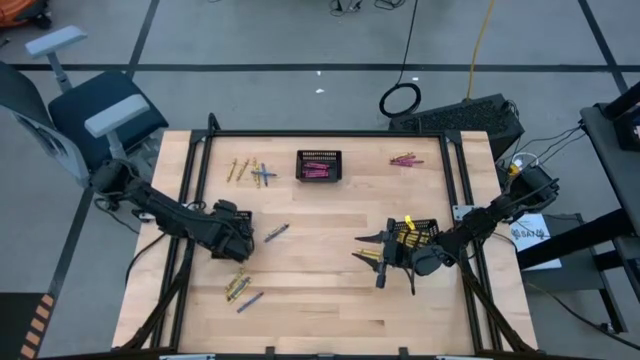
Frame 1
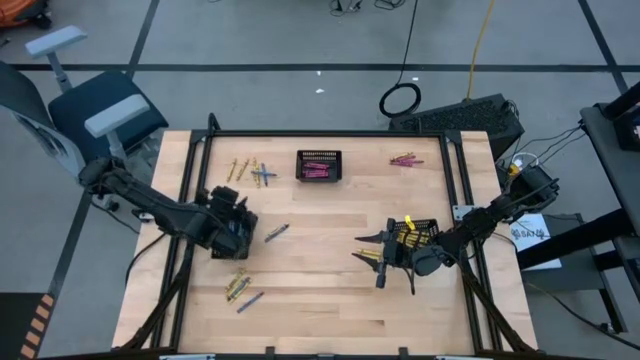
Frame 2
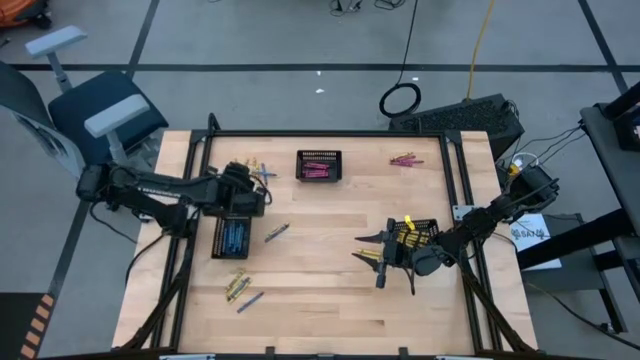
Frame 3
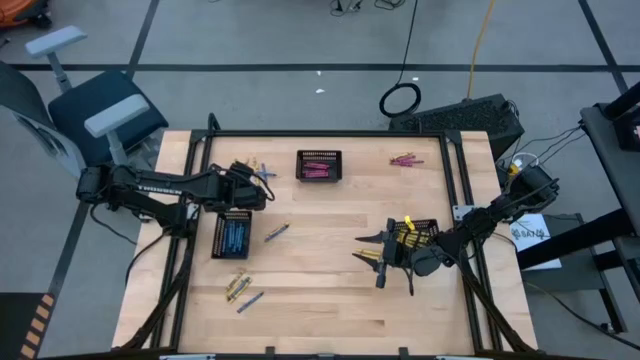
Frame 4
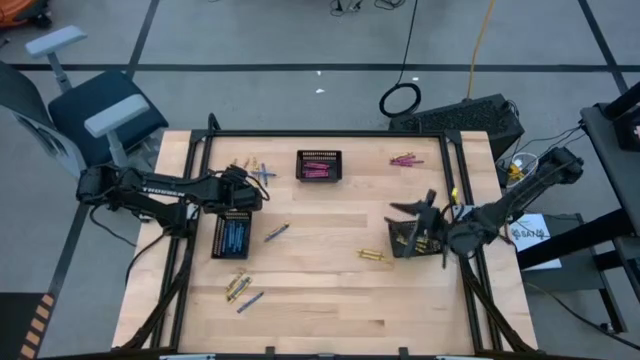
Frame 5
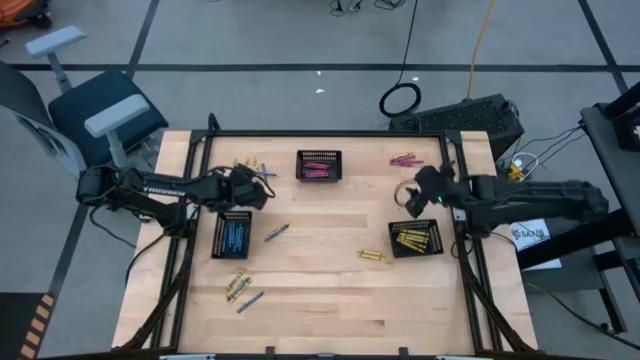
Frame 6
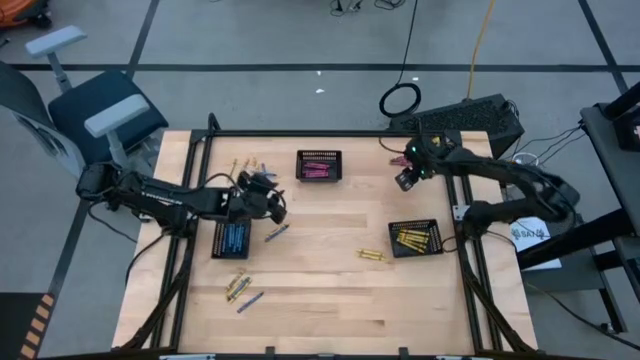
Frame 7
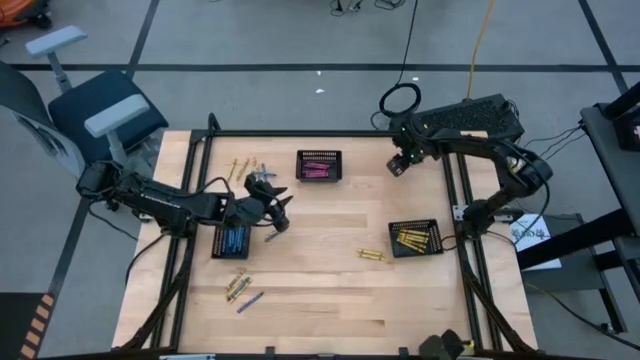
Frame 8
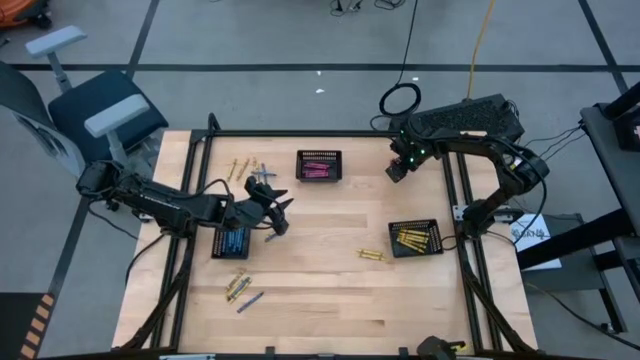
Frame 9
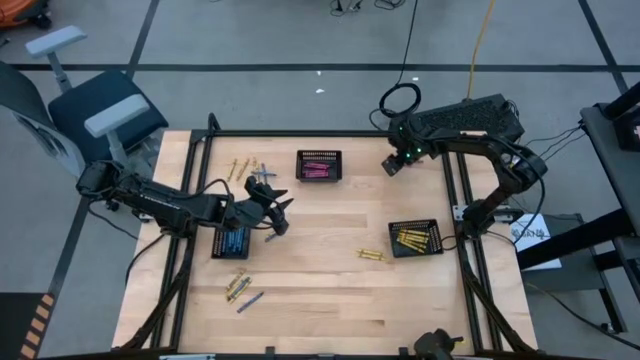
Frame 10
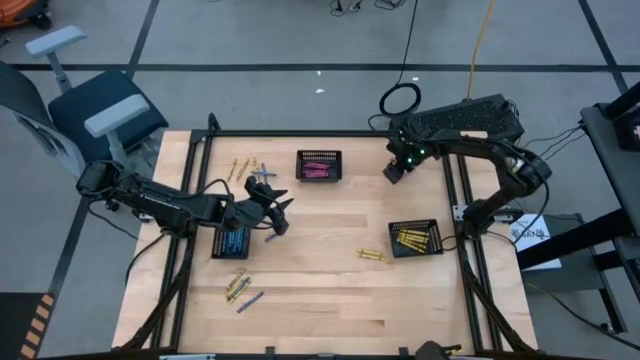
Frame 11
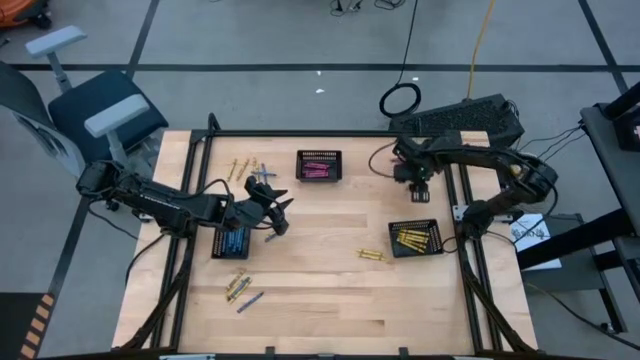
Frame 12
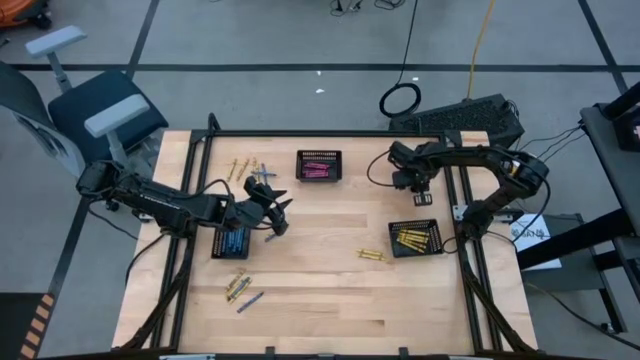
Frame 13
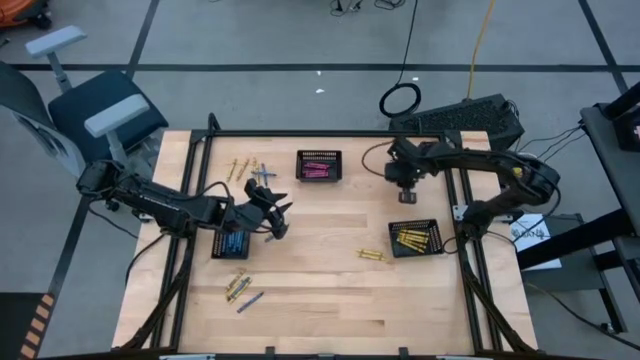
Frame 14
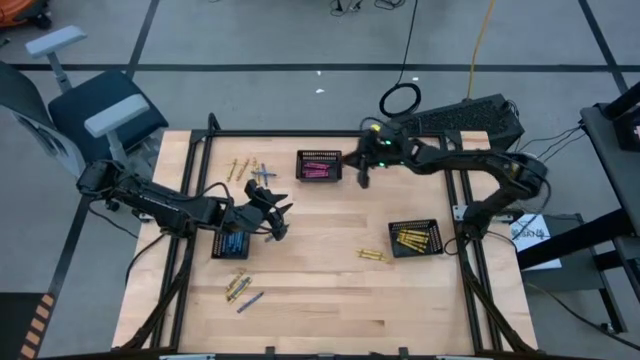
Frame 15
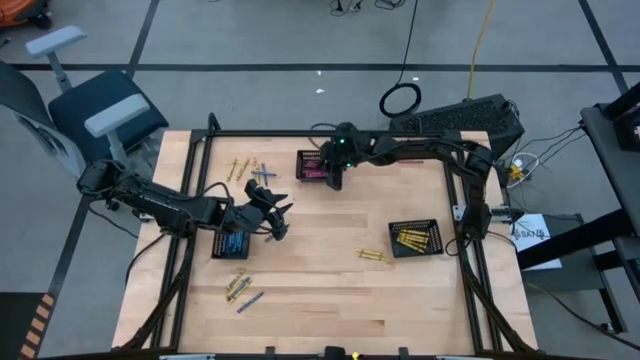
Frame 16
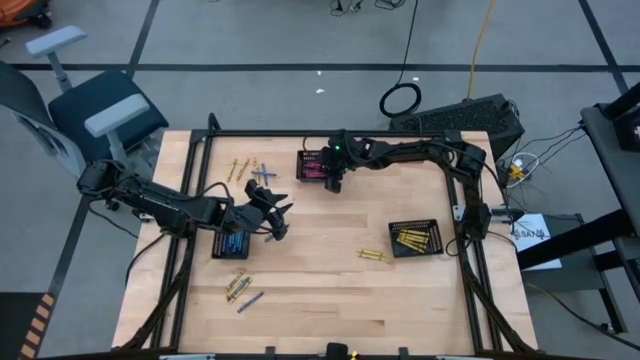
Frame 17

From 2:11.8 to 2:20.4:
Task: Sort crayons
Put the bottom red crayon into the top black bin

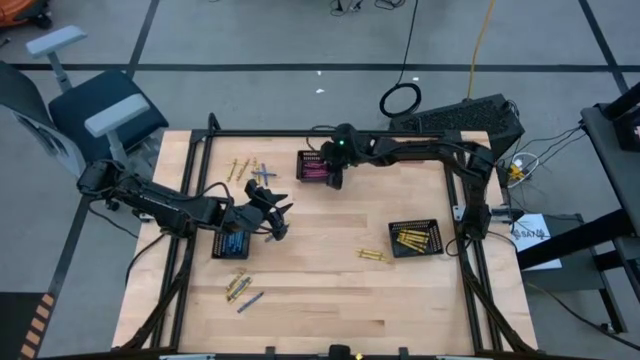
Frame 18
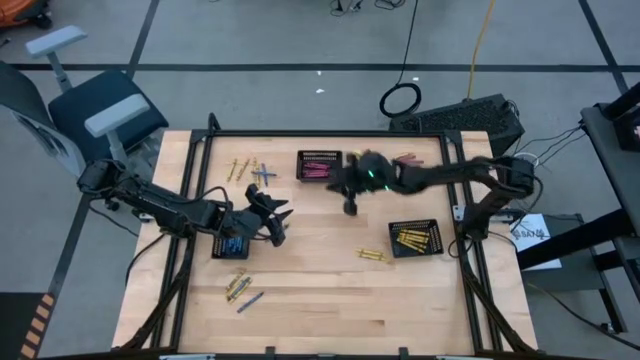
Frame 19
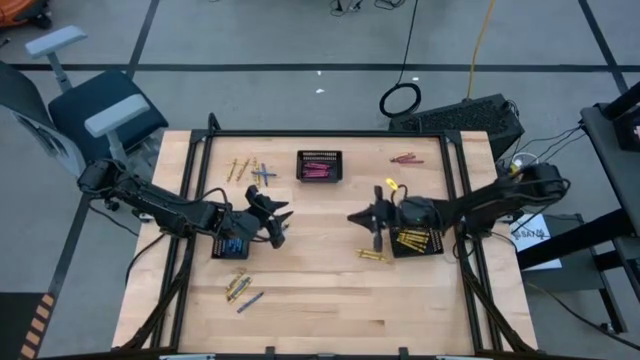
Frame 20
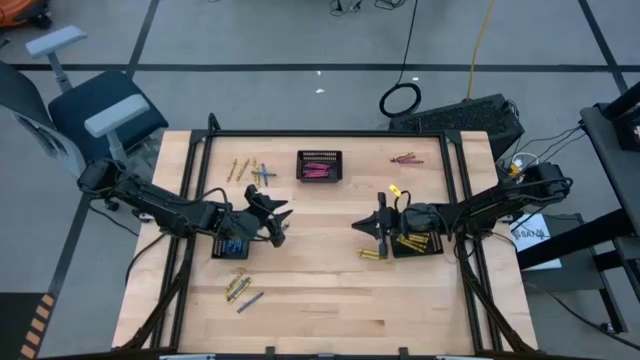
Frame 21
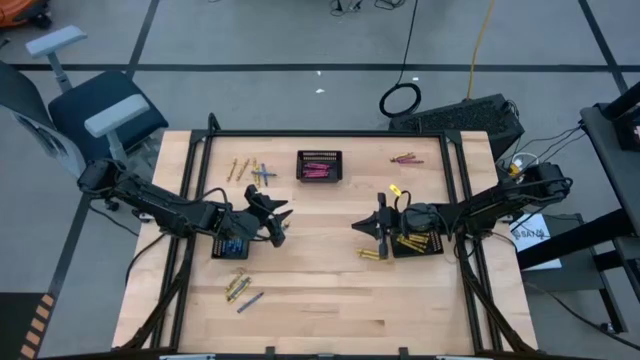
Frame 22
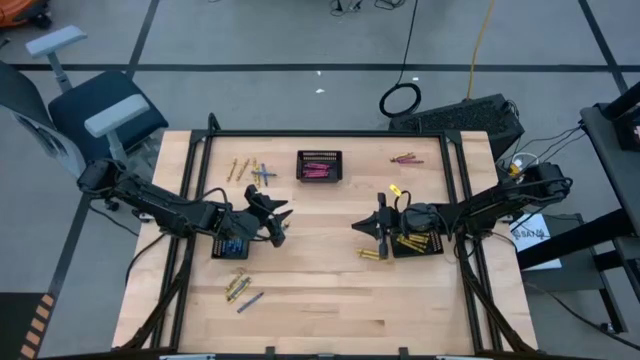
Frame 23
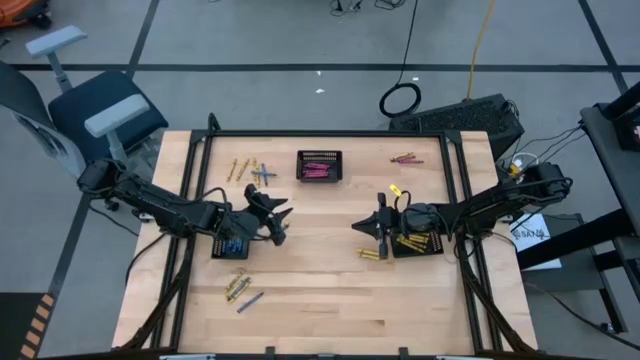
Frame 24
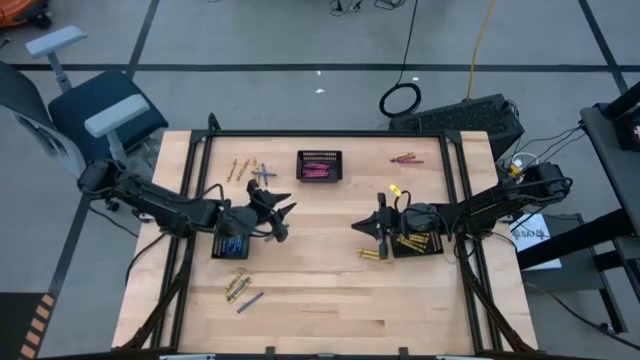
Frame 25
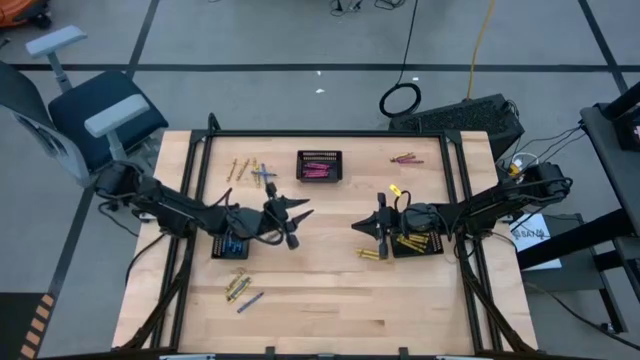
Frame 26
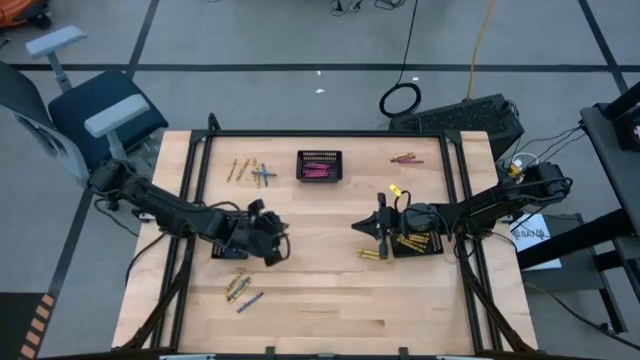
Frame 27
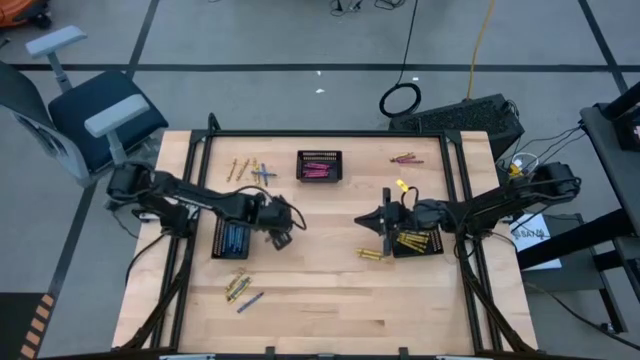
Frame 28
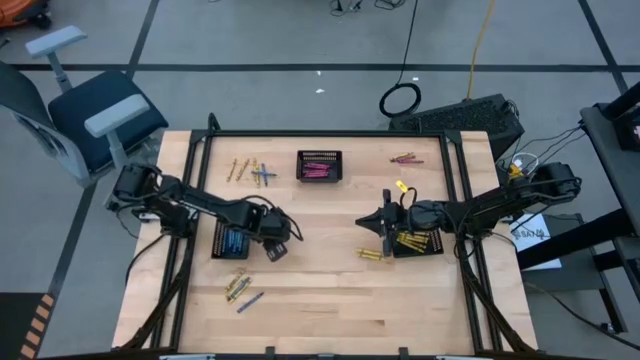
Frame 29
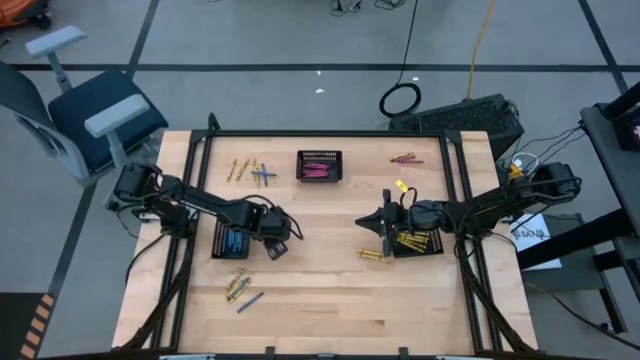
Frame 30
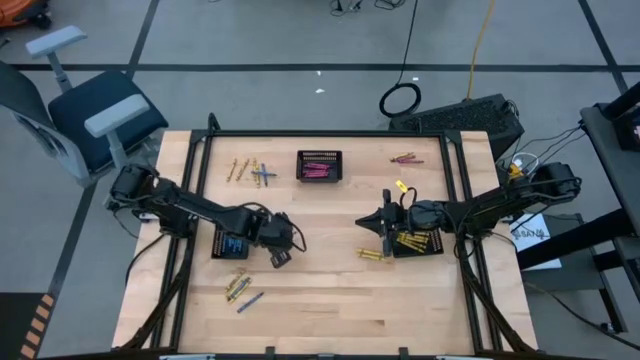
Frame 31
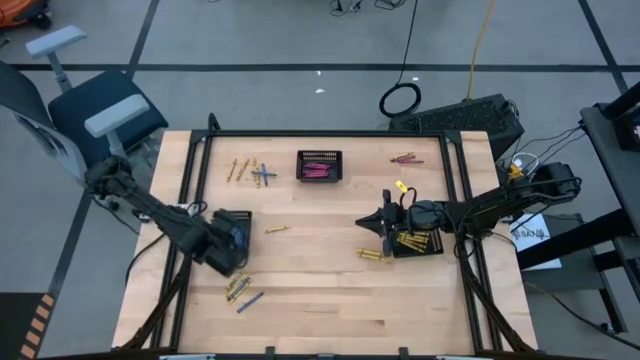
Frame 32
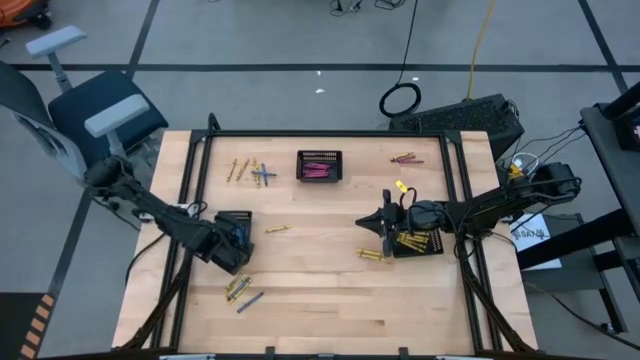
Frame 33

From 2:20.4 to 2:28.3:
Put the blue crayon into the bottom left black bin

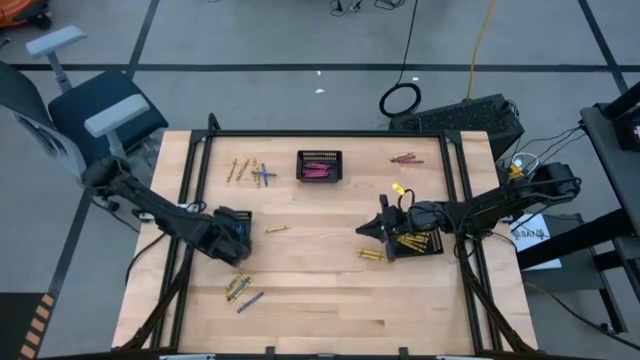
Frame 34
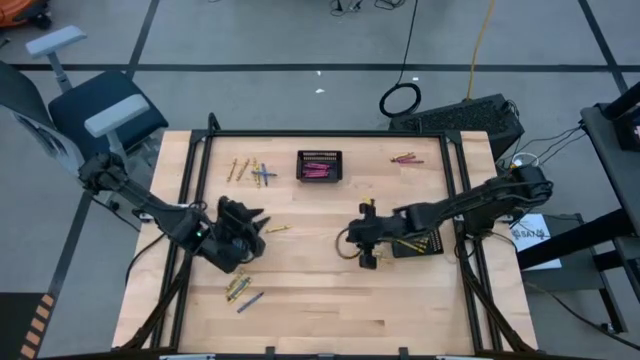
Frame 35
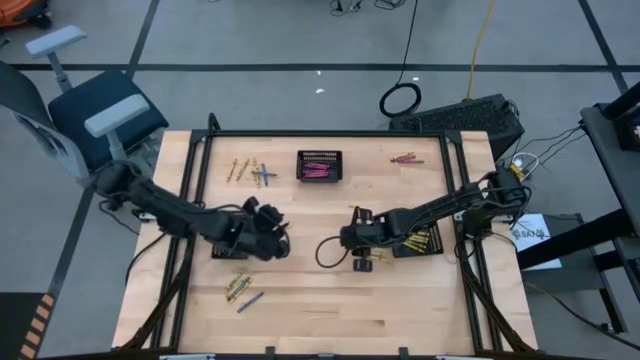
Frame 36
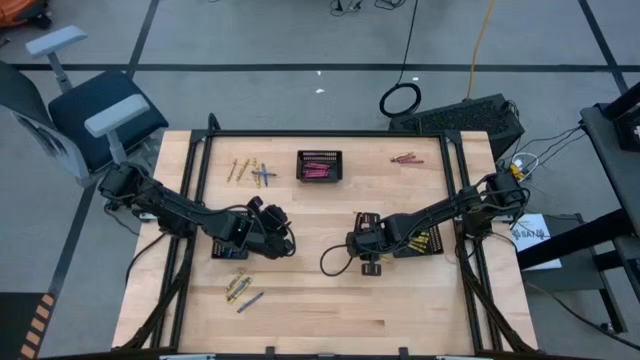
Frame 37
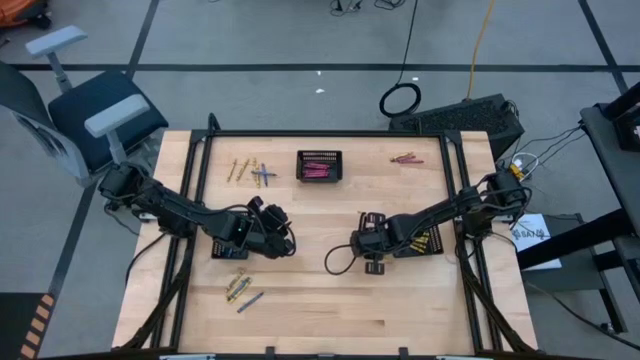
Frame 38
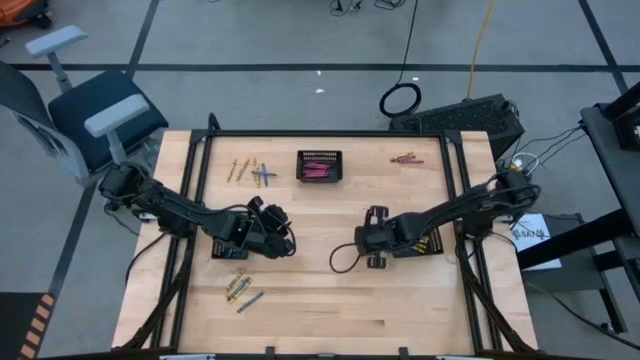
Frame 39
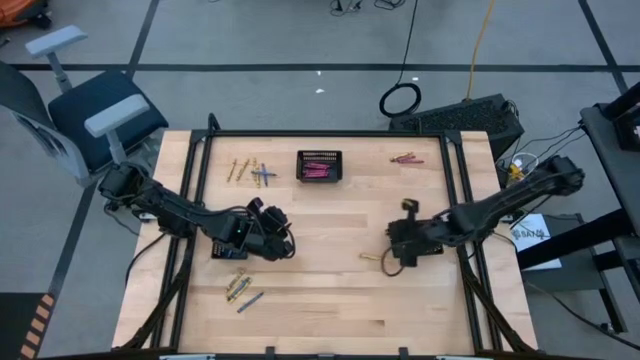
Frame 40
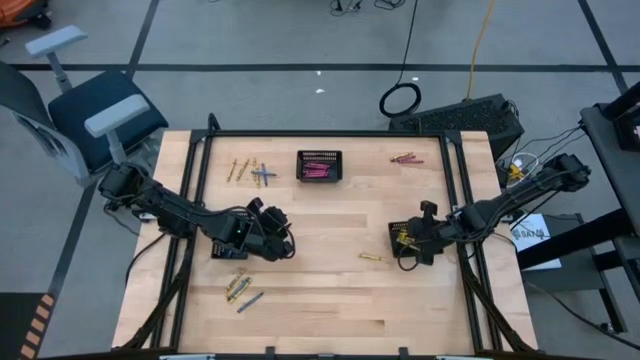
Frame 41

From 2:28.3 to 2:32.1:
Put the yellow crayon into the bottom right black bin

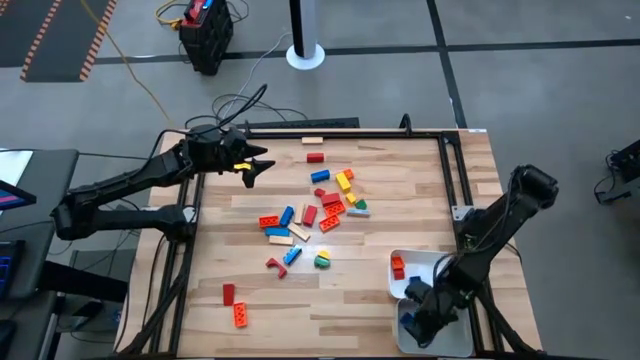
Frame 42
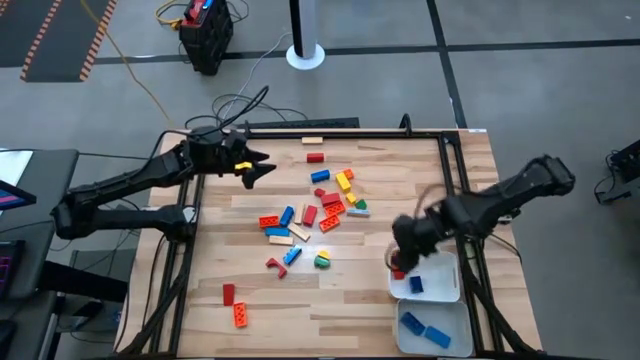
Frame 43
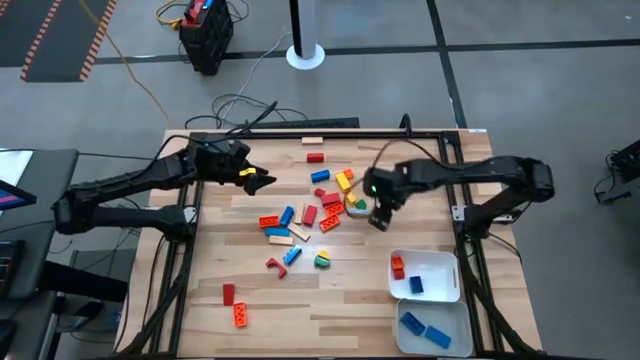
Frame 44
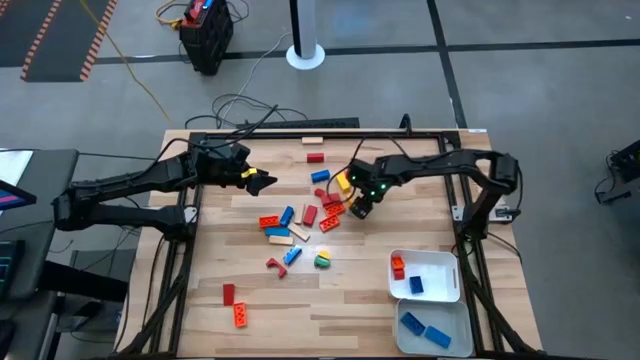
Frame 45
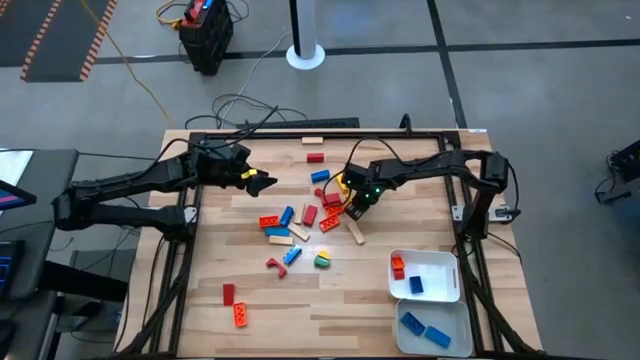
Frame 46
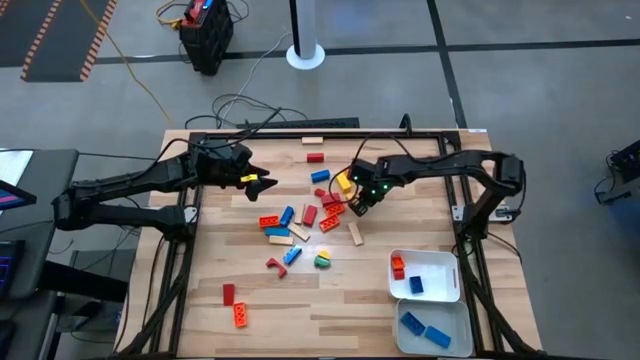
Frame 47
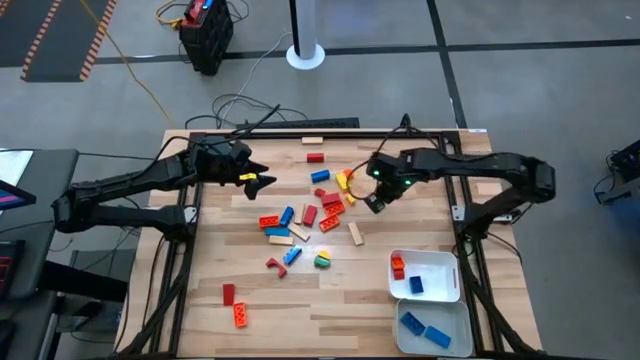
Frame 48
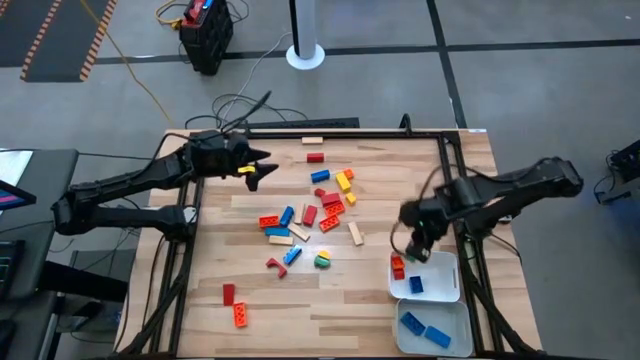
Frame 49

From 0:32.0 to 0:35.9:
Task: Sort blocks by size
Put the small green block into the white bin
